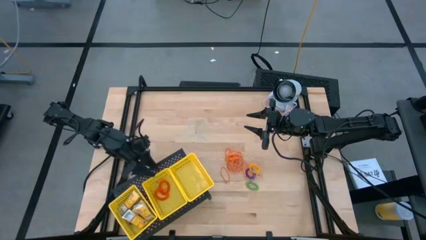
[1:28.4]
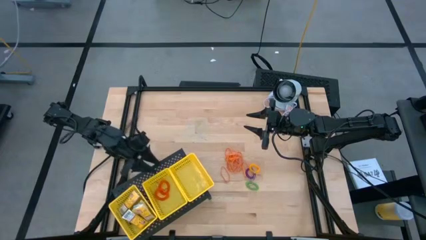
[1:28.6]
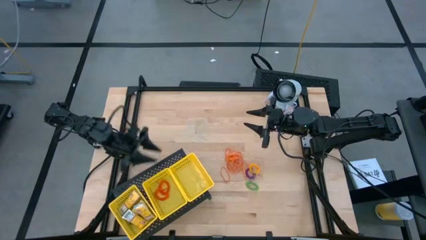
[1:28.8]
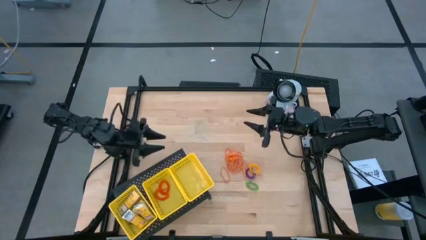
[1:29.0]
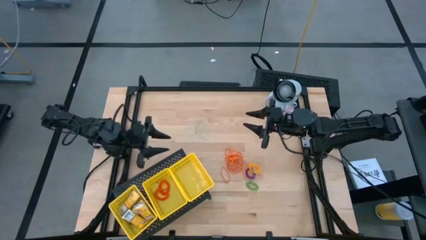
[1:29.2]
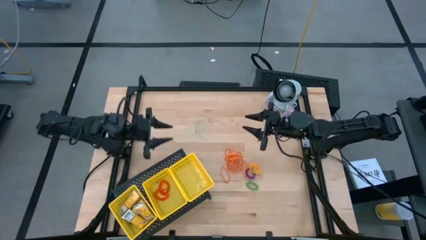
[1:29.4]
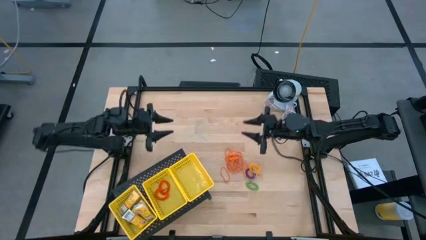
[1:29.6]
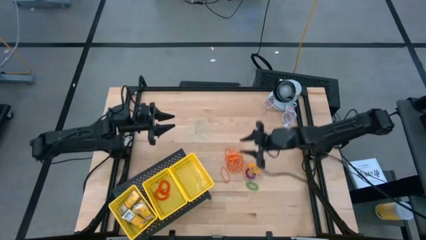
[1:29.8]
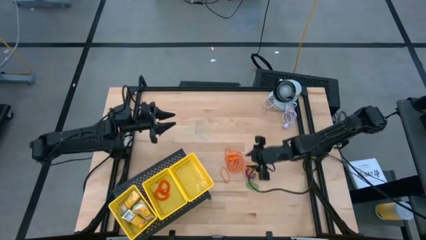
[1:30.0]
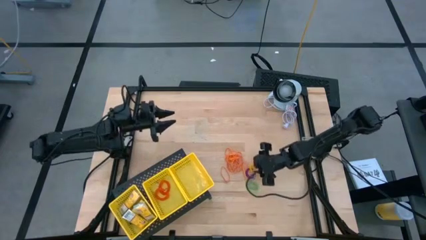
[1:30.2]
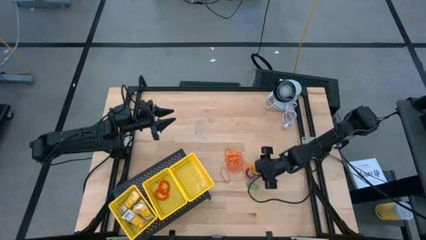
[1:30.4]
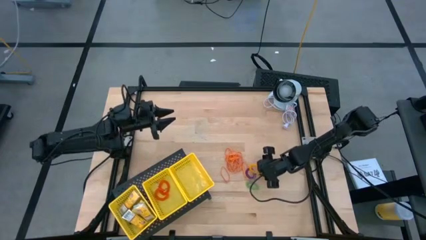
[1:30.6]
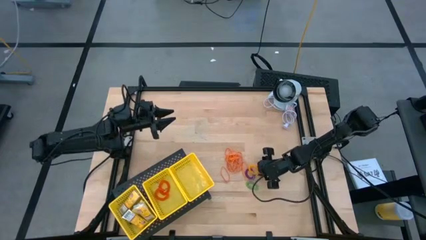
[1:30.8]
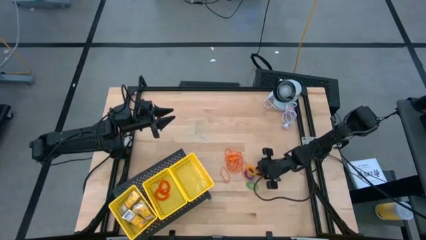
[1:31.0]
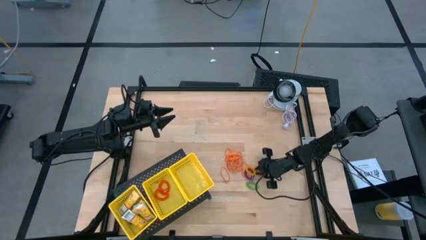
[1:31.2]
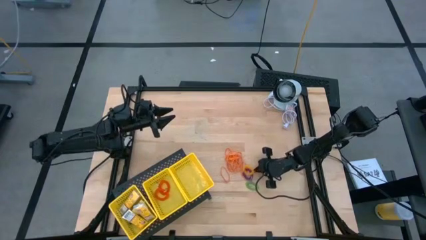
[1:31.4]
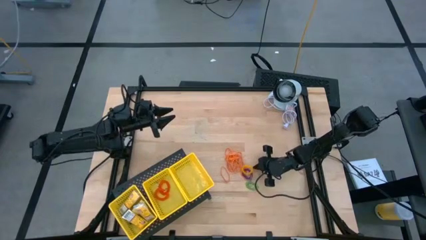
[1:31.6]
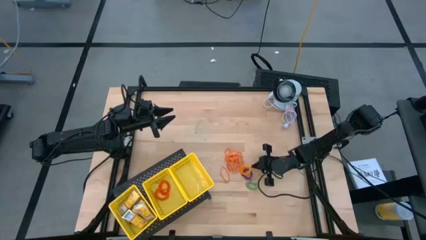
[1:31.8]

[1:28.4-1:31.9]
Task: Pick & Place Office Desk Supplies
Put the yellow spring keychain into the center yellow bin on the shelf

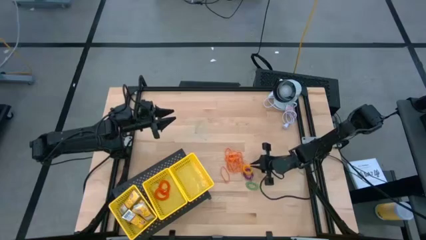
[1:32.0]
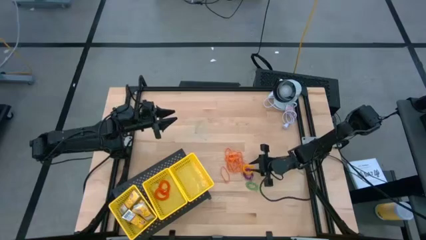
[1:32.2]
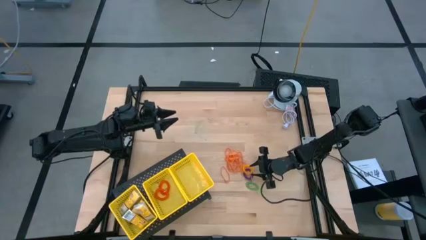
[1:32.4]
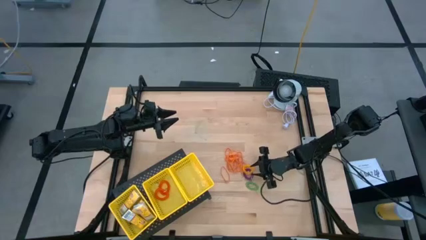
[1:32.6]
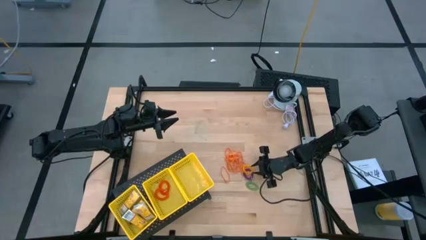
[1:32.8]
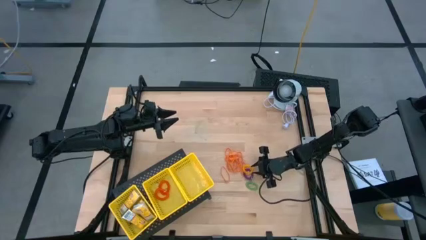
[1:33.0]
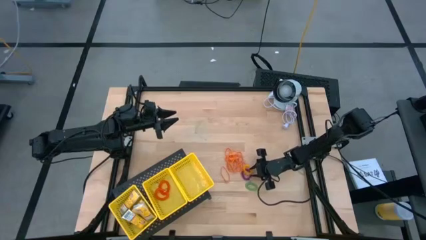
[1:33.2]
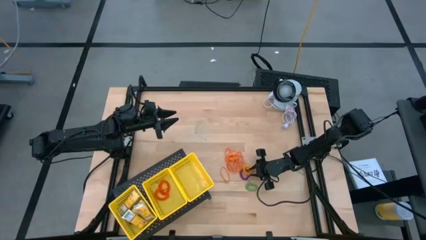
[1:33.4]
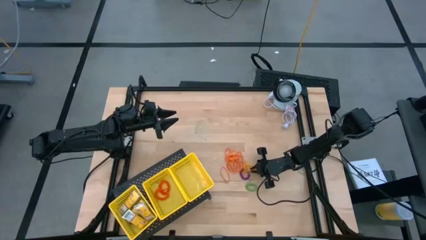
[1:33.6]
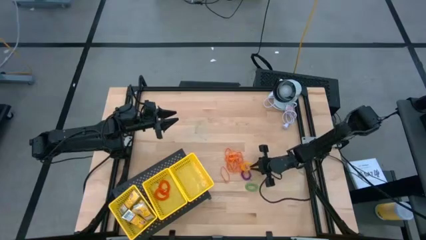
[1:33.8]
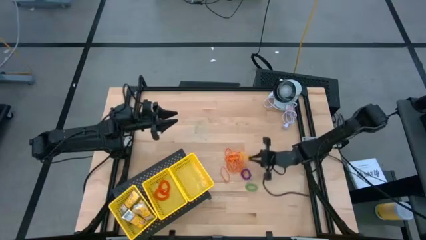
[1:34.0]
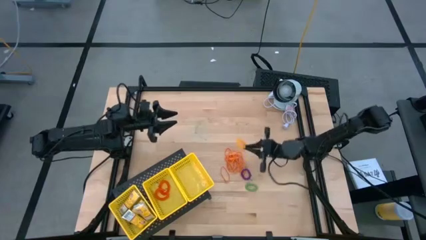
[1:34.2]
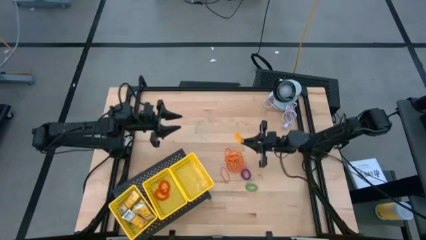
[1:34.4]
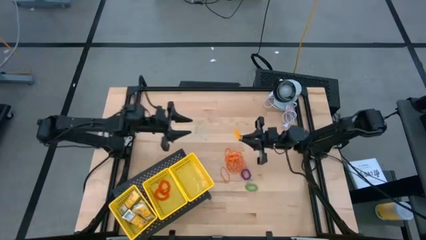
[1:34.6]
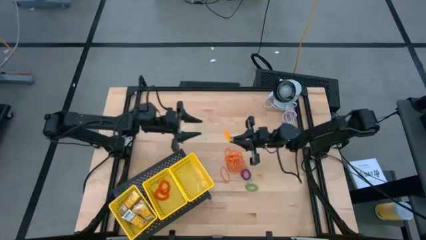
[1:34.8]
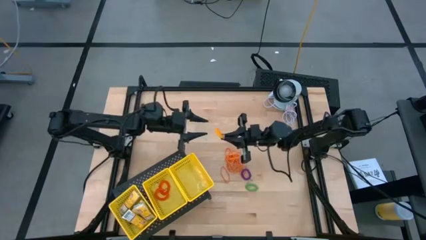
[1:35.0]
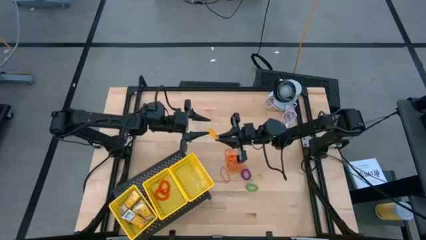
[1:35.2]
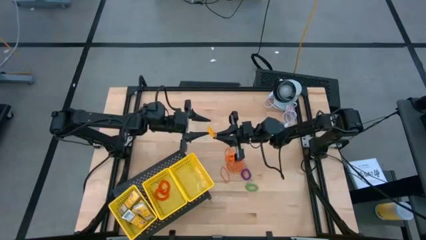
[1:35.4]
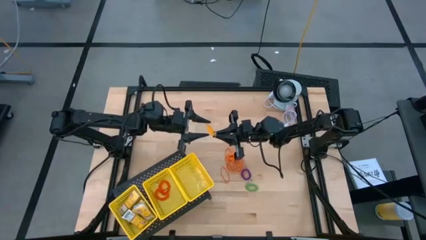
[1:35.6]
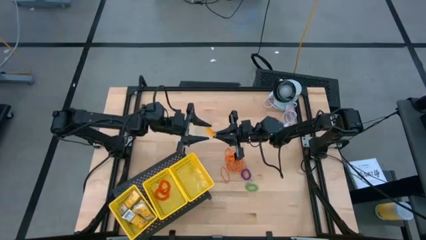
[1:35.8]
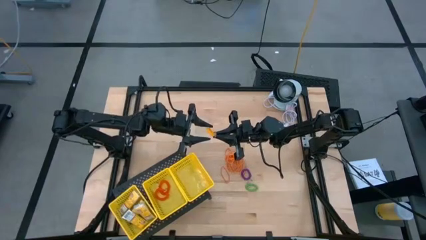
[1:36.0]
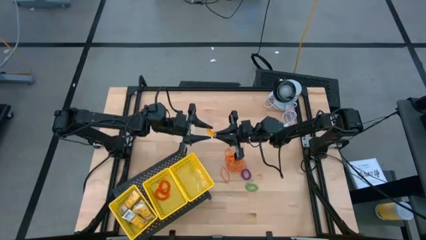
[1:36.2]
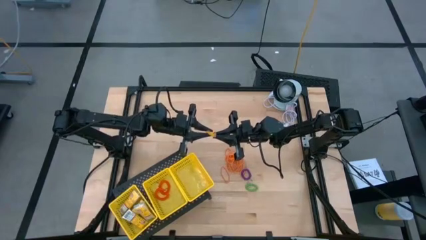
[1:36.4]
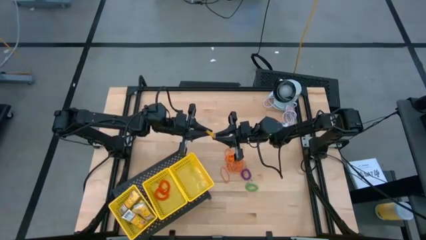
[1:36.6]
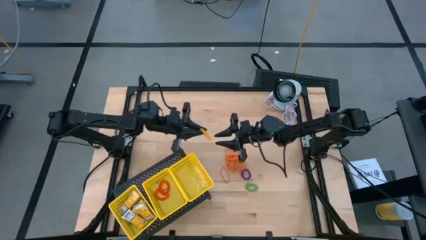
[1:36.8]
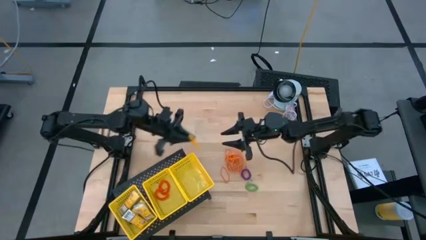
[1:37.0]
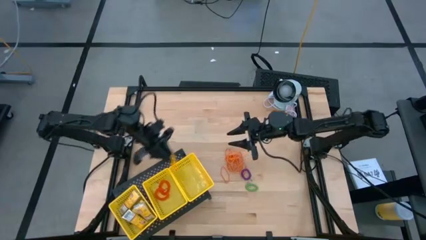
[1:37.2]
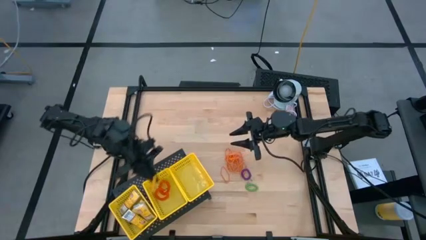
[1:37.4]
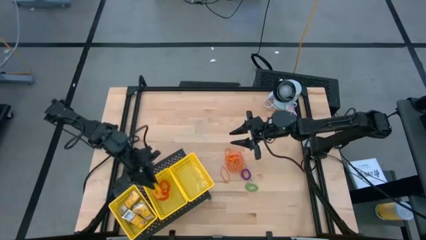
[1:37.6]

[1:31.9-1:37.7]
Put the yellow spring keychain into the center yellow bin on the shelf

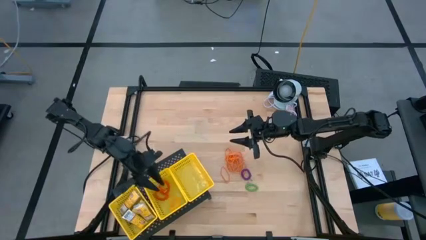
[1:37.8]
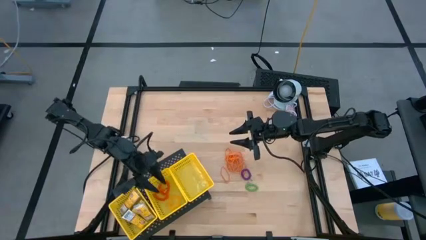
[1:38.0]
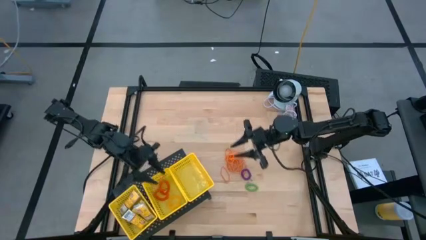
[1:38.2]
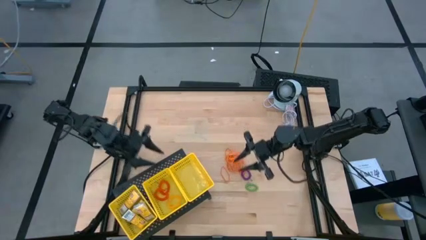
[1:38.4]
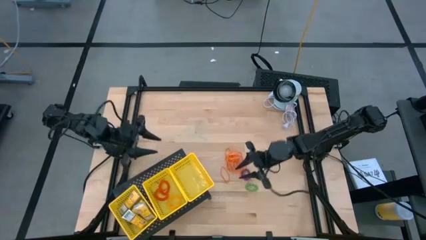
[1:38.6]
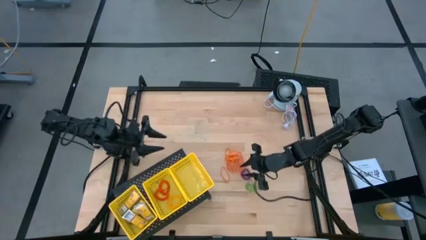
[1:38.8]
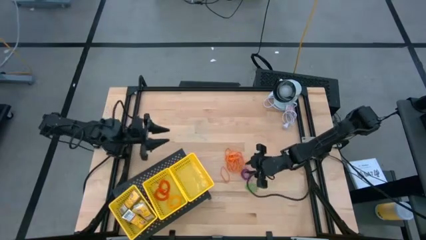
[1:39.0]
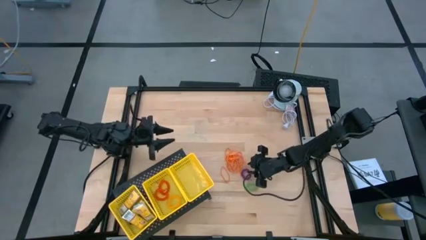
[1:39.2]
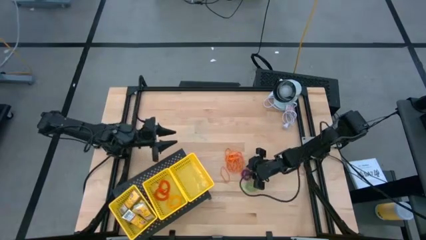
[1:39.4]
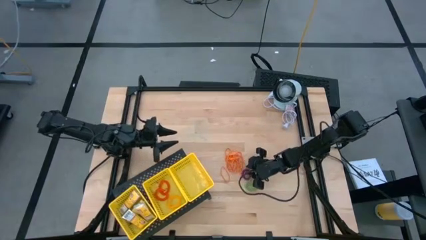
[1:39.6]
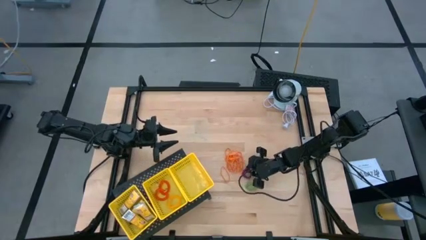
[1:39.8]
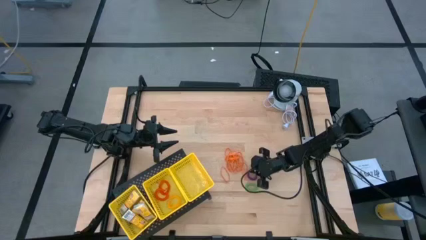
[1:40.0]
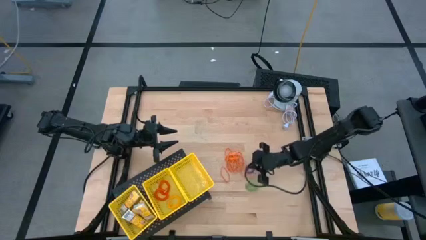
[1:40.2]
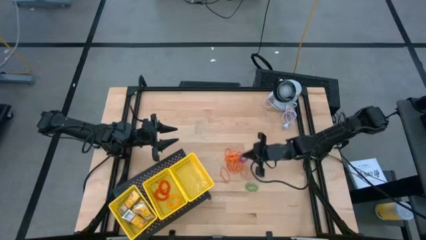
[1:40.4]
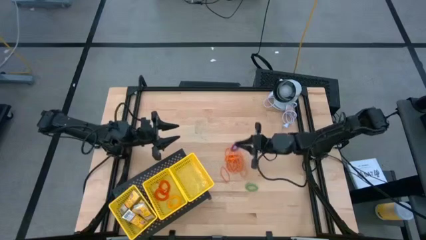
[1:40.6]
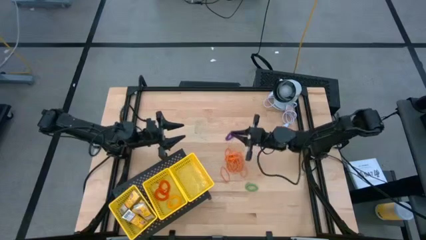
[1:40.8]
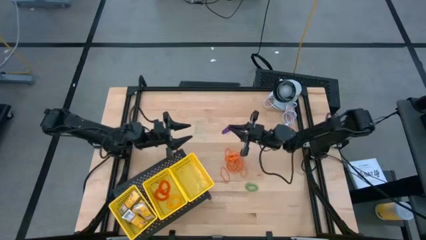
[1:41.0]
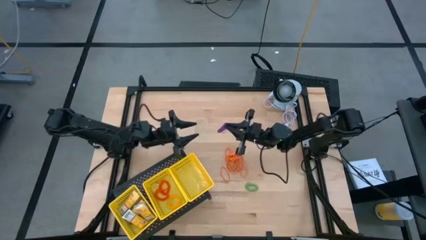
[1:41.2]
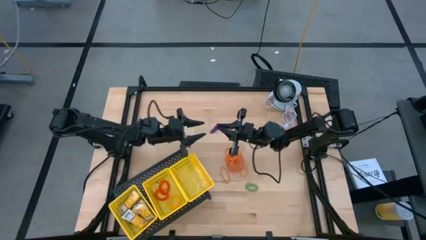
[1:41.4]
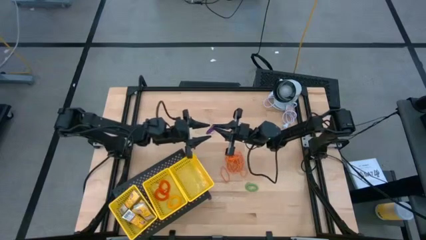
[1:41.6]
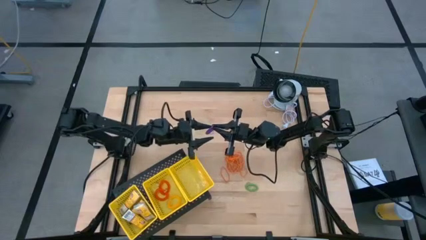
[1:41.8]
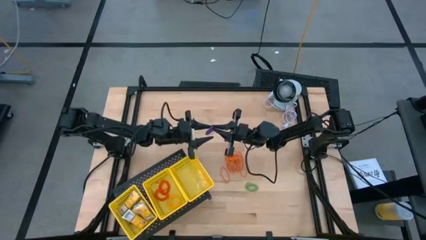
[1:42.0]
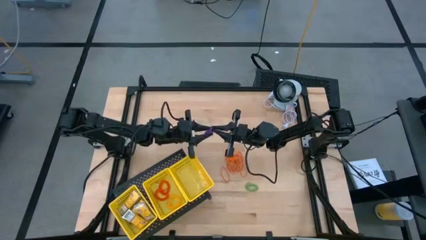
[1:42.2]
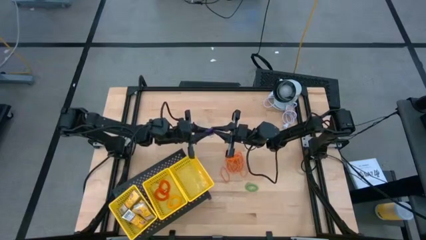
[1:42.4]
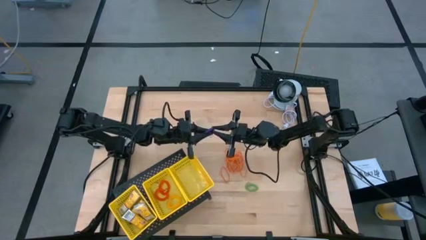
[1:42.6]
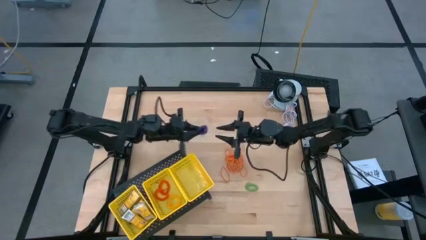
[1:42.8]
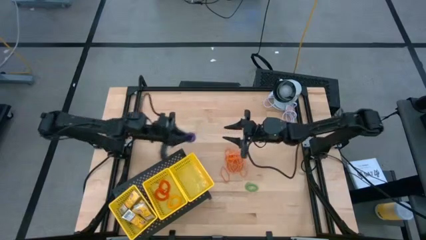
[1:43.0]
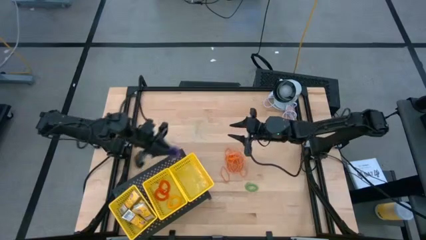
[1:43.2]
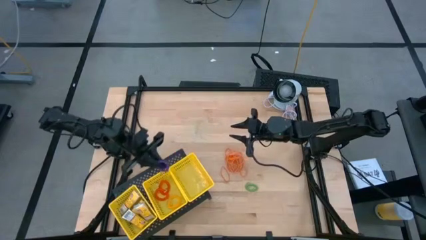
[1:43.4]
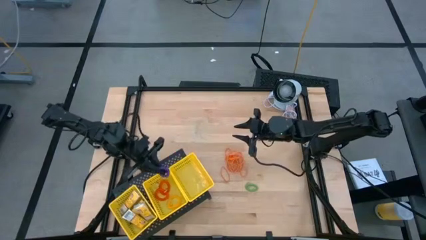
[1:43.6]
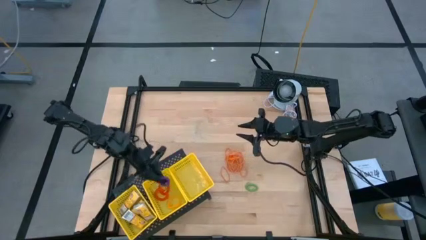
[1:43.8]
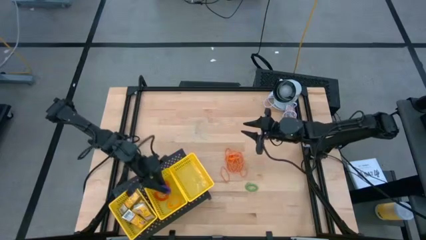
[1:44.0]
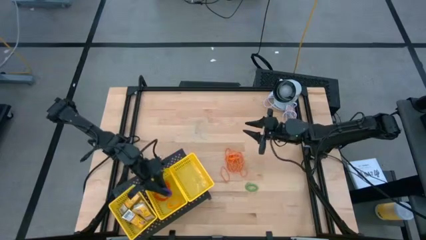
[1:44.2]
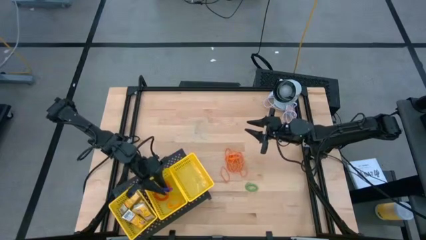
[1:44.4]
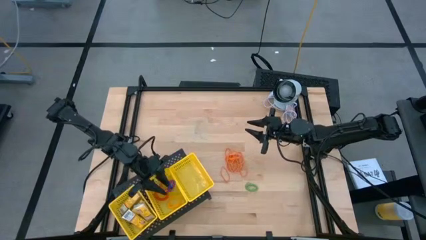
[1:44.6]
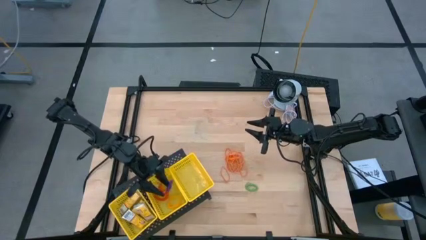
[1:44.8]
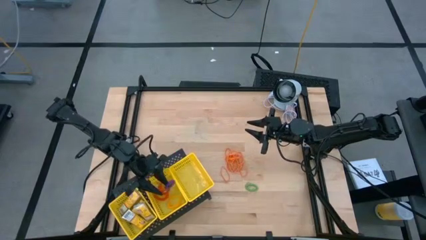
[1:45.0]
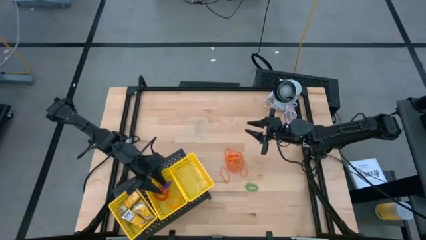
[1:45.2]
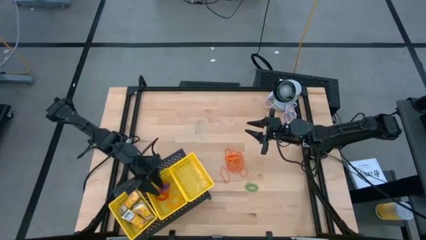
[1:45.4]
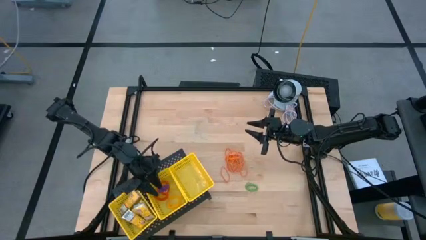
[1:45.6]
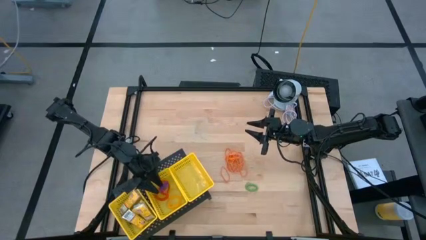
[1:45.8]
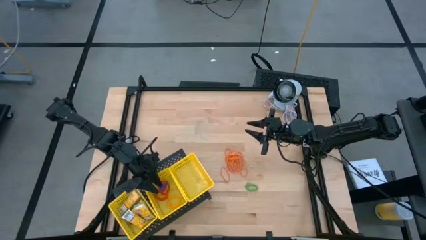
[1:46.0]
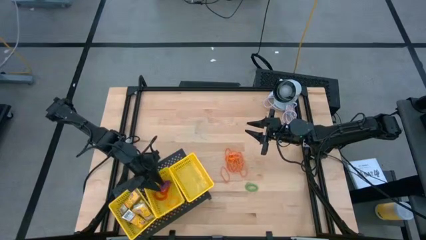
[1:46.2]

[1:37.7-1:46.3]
Put the purple spring keychain into the center yellow bin on the shelf
